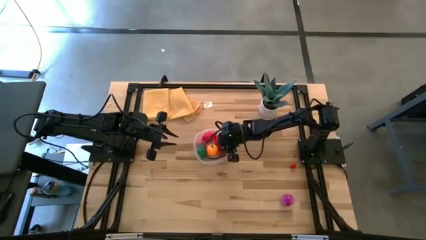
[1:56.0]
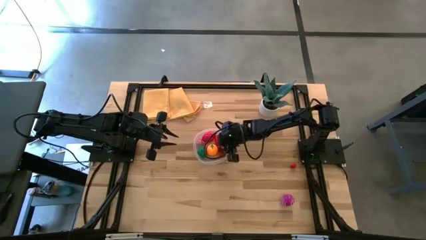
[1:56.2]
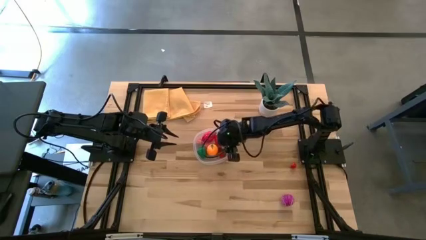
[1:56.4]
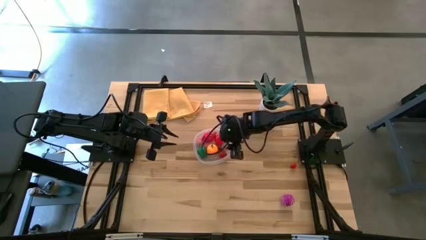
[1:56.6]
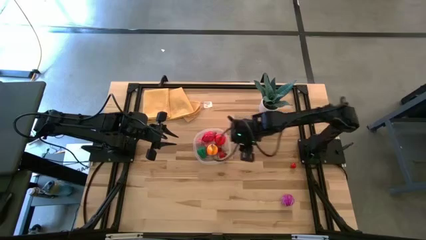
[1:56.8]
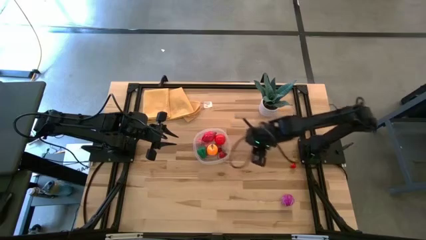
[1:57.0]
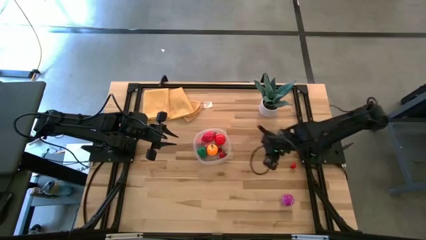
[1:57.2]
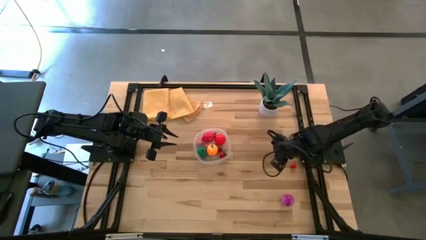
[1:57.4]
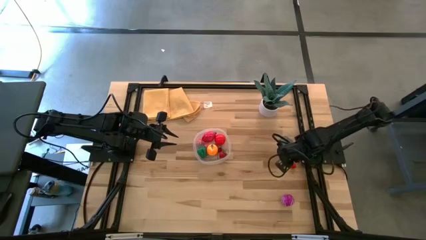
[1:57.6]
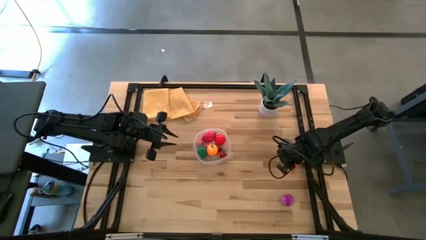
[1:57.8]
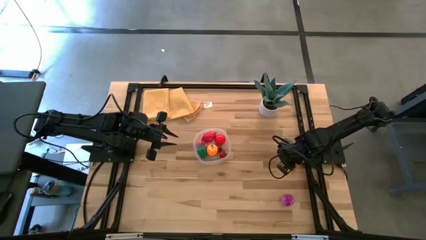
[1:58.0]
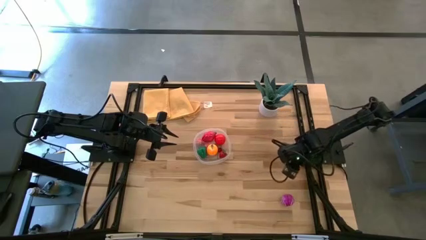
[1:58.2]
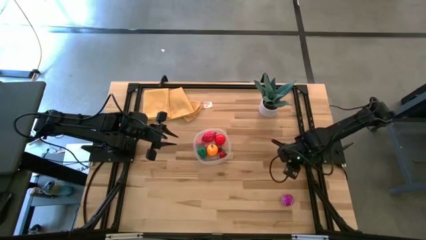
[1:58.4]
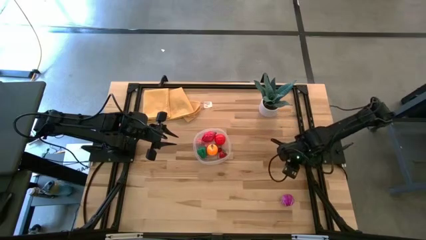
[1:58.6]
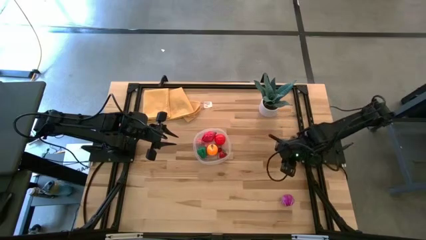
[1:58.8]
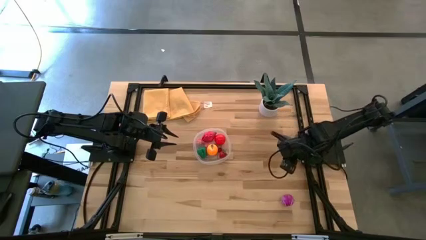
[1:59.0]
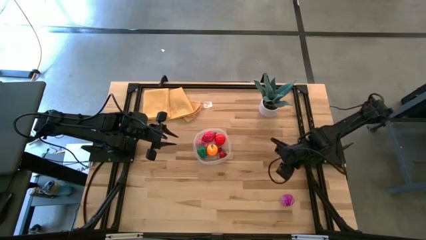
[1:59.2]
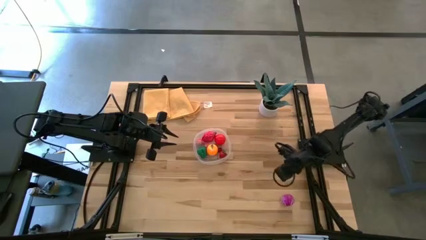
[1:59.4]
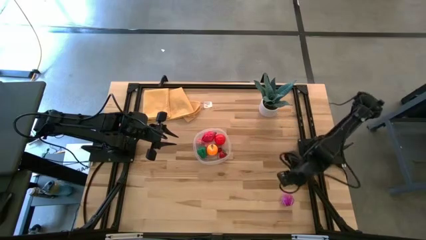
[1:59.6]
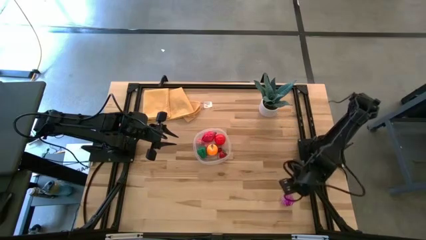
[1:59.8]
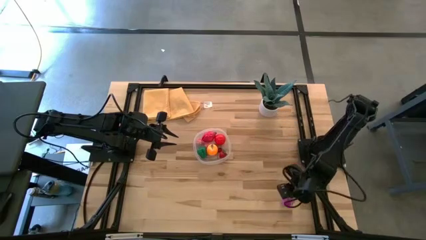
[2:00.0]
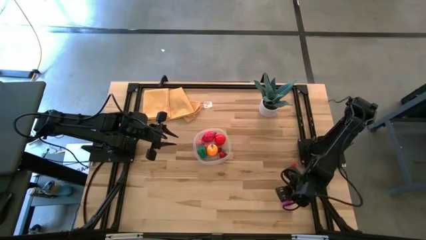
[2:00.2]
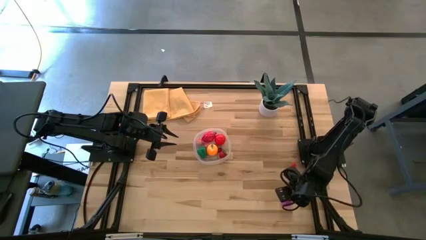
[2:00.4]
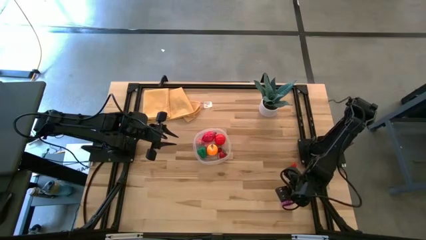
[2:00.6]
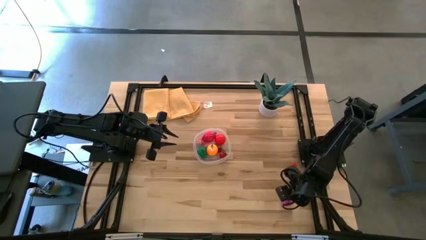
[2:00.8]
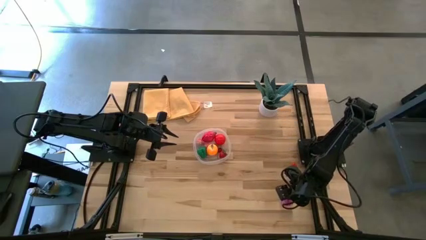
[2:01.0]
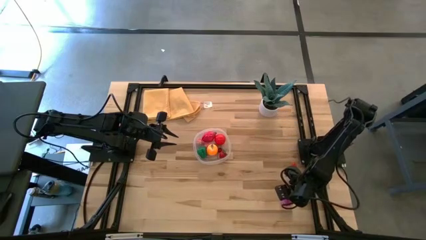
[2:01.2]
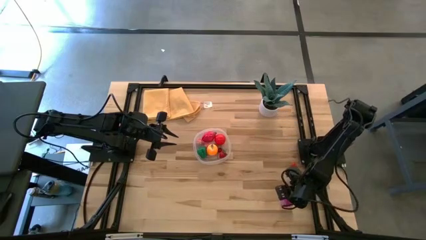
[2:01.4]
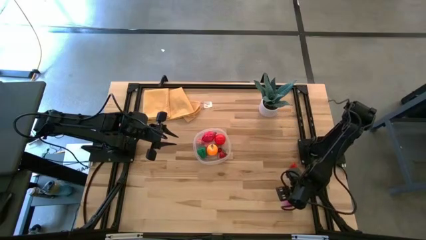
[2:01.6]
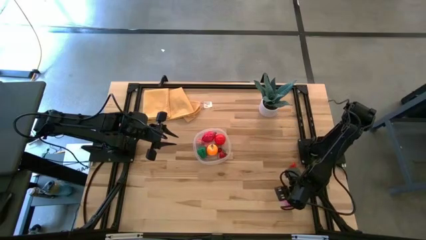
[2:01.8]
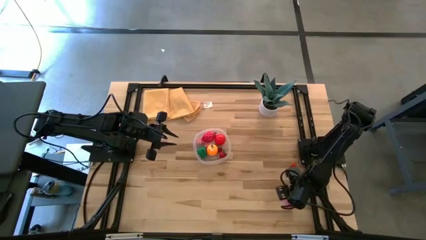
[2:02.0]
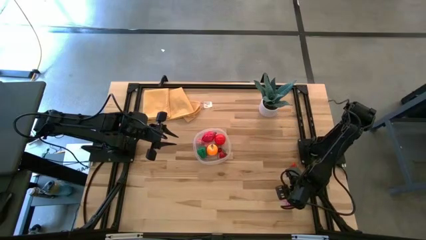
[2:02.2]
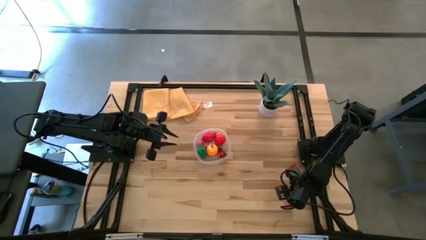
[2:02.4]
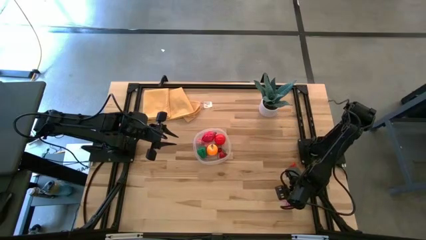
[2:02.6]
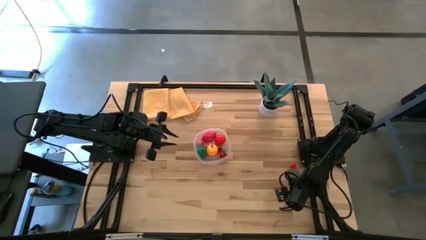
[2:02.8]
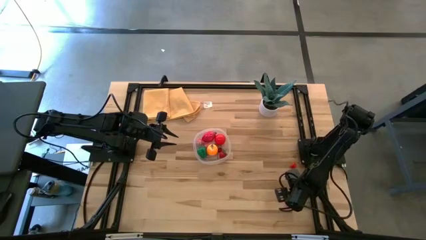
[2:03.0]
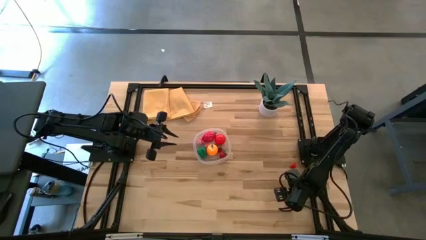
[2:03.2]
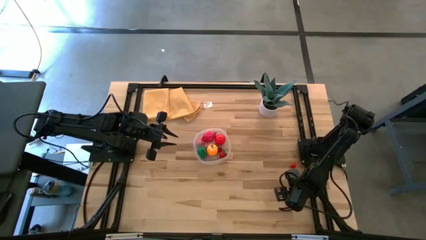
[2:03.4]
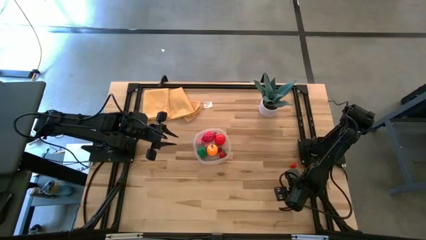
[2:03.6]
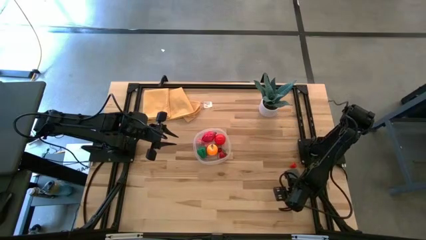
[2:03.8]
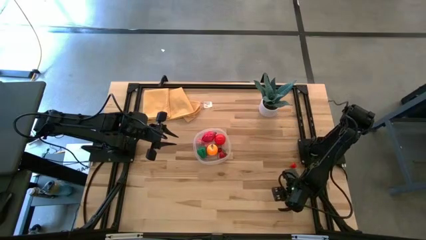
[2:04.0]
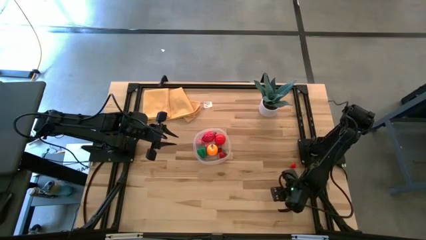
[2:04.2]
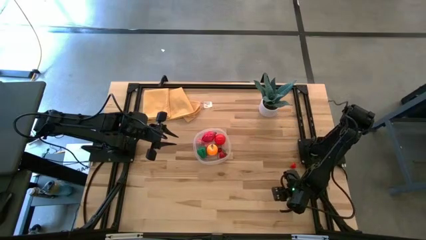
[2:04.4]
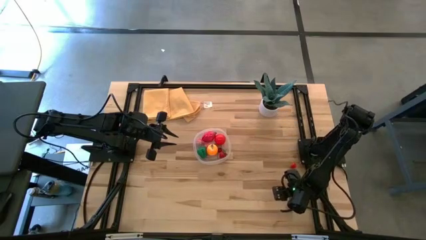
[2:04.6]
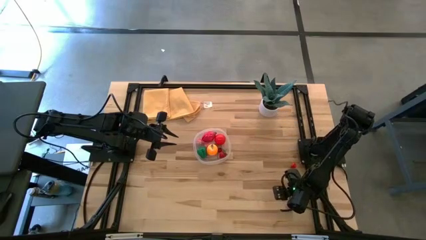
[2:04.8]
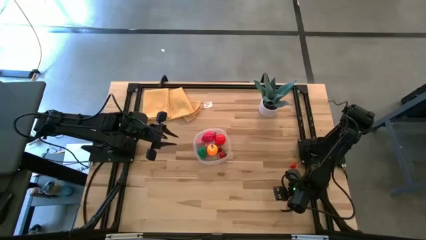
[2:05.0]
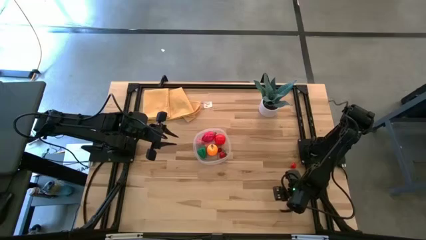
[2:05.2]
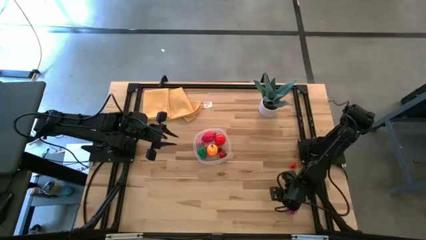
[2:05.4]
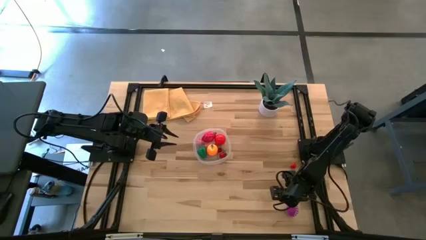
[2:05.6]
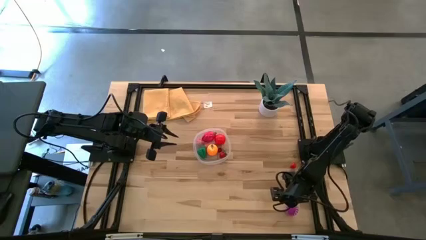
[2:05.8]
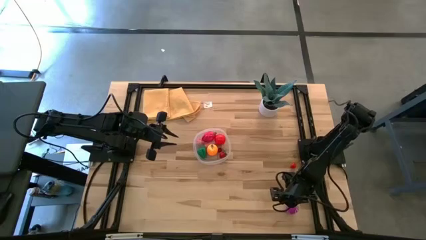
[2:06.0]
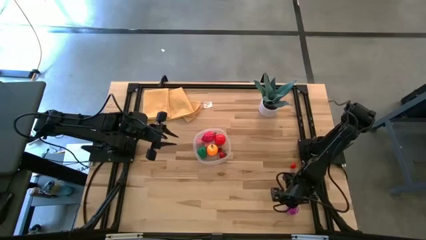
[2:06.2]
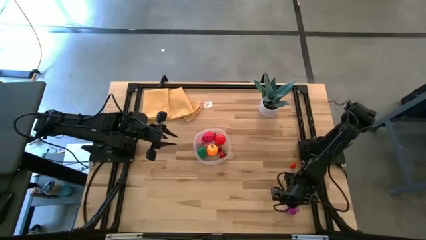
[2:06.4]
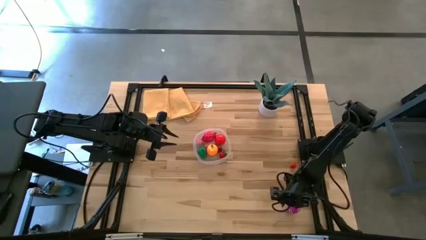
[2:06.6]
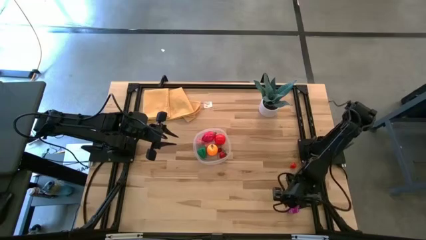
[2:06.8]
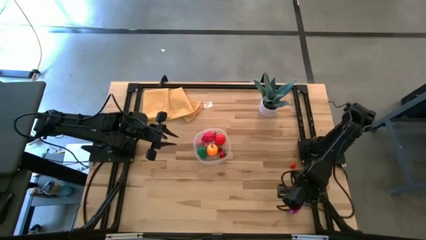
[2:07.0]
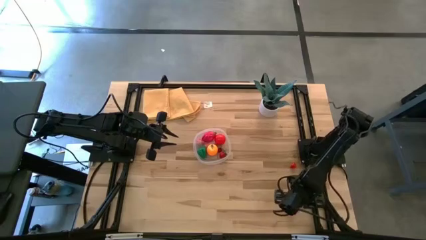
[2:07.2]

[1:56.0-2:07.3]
Task: Pick and placing Produce into tupperware
Put the purple onion into the transparent bin

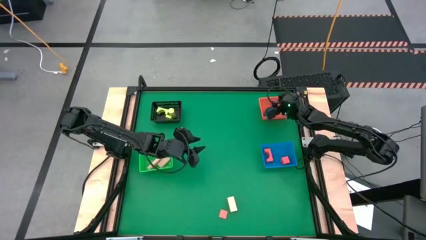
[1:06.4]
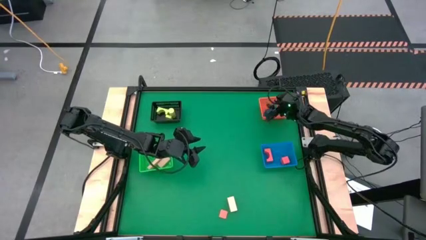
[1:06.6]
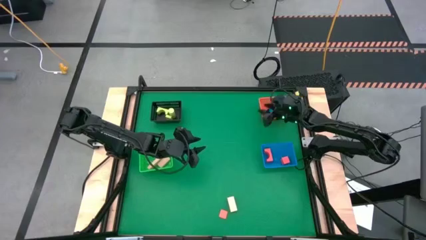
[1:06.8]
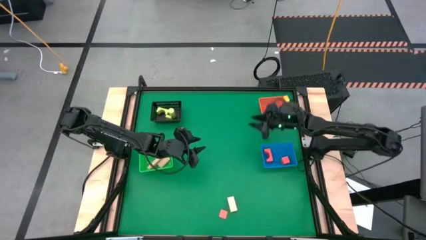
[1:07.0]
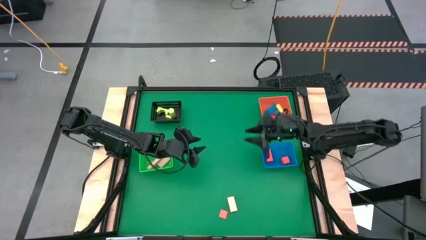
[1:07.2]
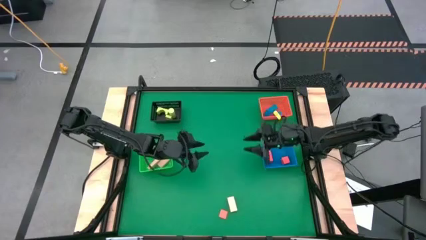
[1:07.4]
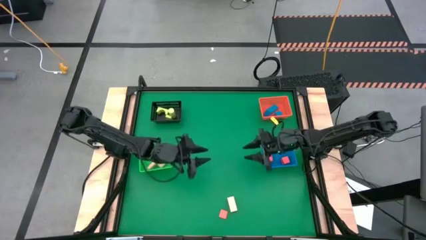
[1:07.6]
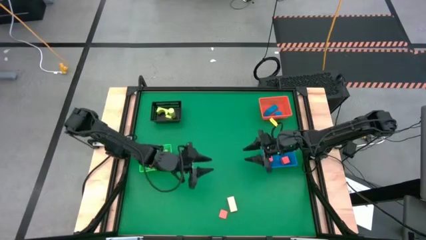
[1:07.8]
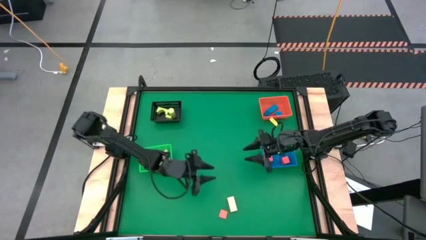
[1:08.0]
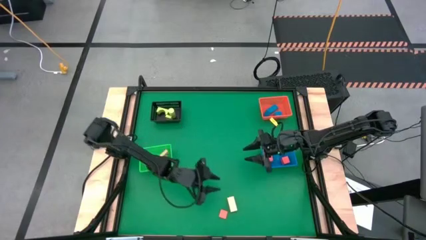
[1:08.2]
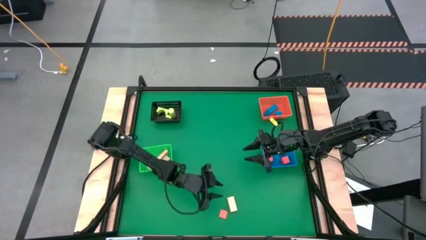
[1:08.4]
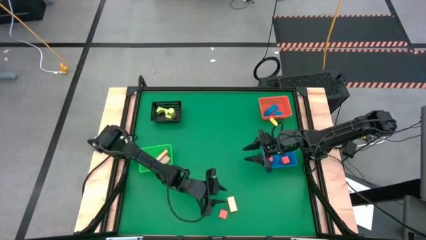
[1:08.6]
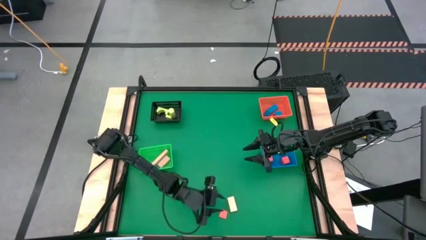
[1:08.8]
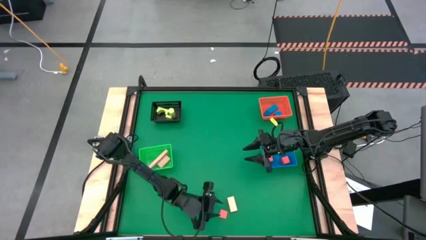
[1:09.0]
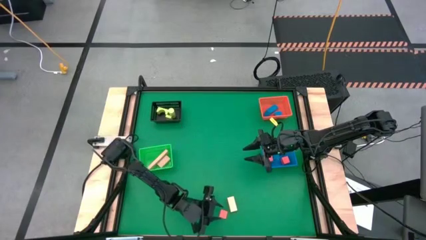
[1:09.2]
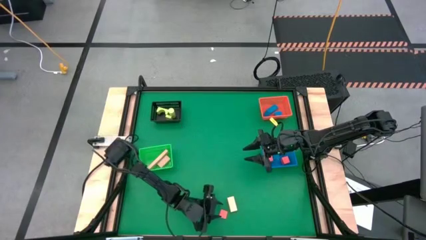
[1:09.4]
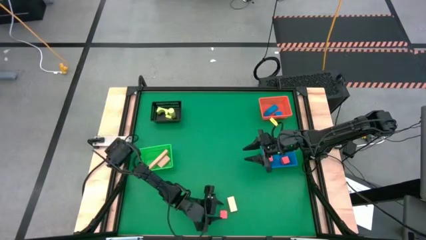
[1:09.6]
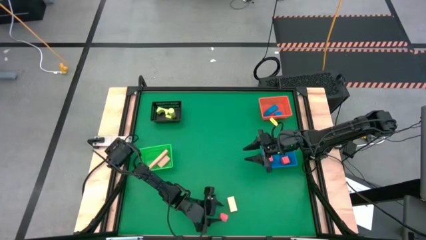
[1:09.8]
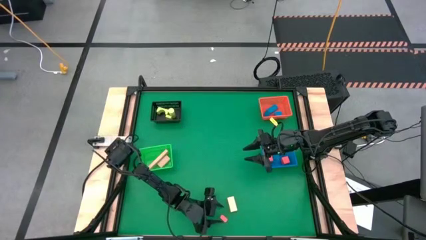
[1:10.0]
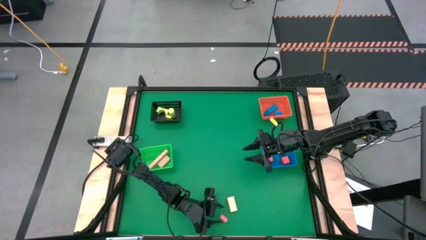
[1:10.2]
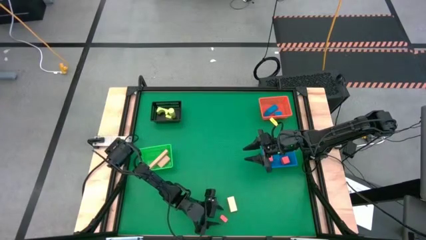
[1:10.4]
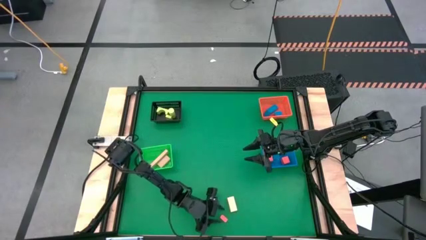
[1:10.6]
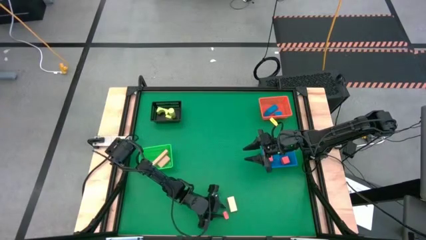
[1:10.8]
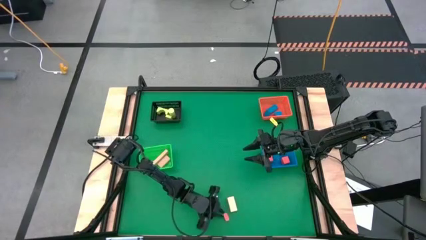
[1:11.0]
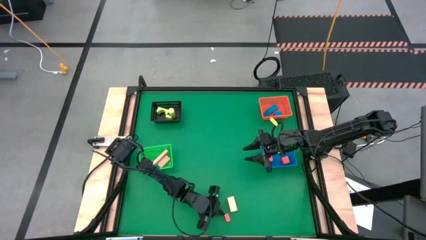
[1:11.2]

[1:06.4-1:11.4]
Task: Sort & place blocks by color
Put the orange block into the blue bin
